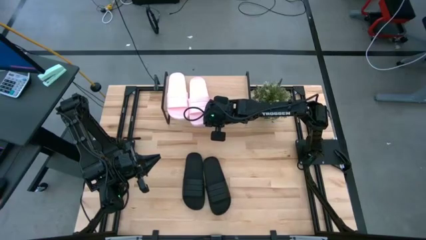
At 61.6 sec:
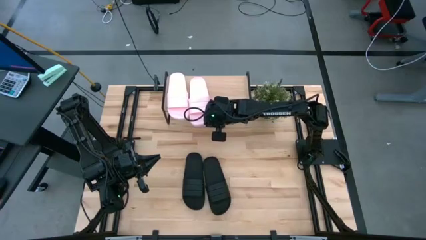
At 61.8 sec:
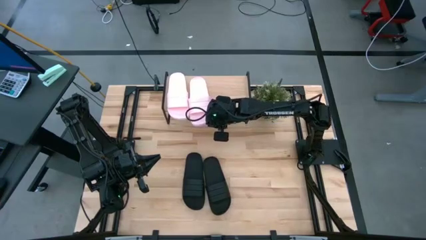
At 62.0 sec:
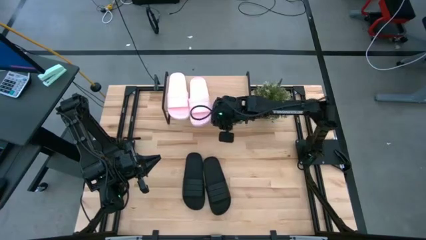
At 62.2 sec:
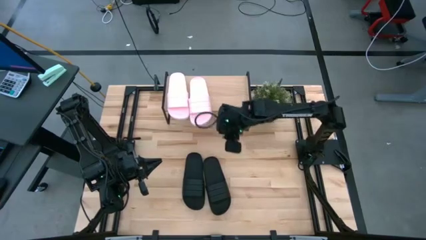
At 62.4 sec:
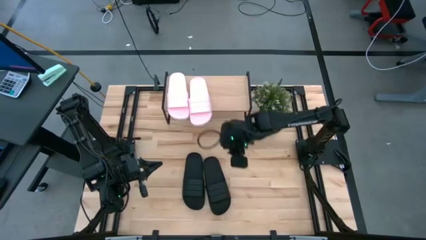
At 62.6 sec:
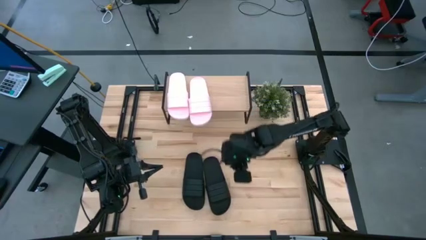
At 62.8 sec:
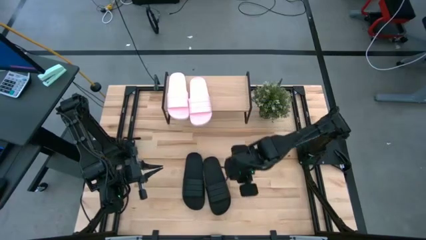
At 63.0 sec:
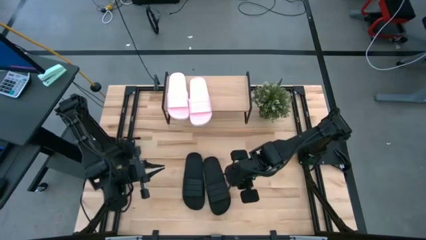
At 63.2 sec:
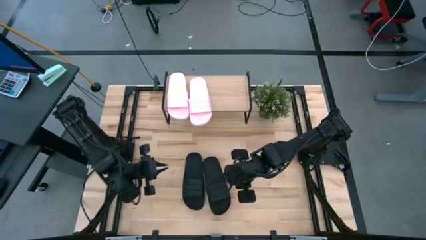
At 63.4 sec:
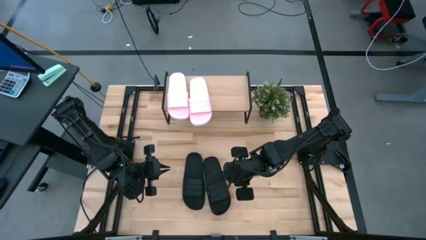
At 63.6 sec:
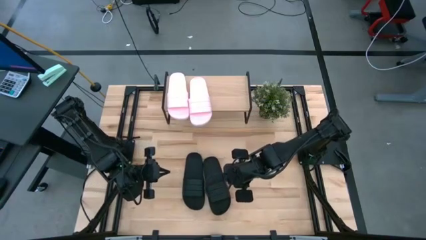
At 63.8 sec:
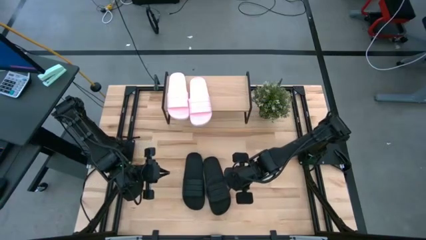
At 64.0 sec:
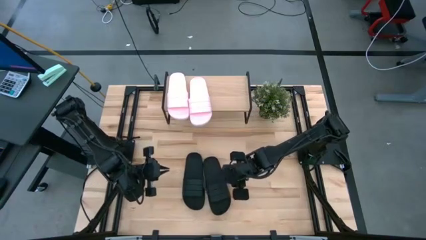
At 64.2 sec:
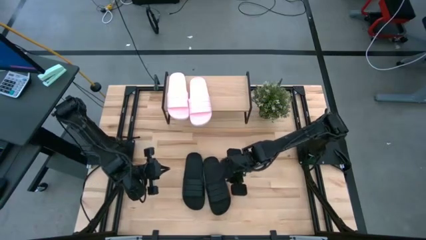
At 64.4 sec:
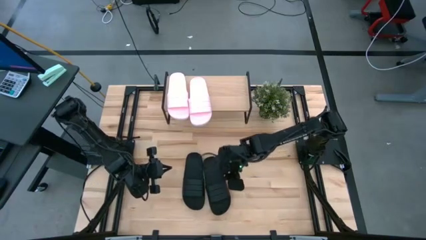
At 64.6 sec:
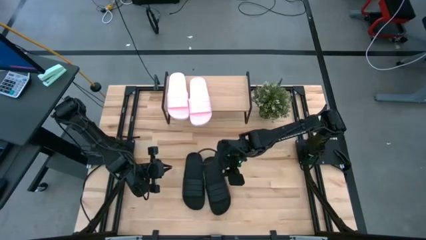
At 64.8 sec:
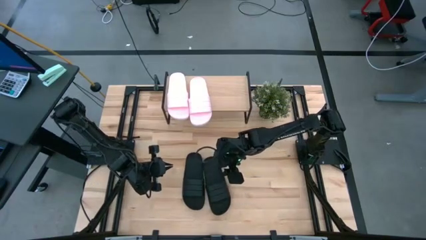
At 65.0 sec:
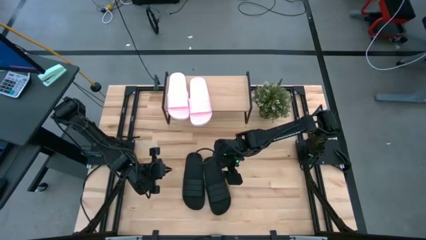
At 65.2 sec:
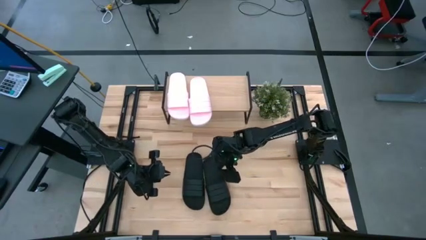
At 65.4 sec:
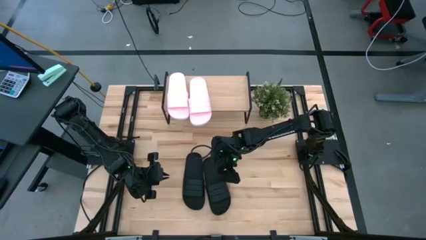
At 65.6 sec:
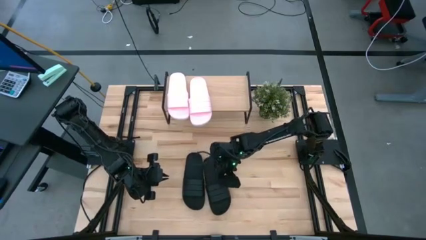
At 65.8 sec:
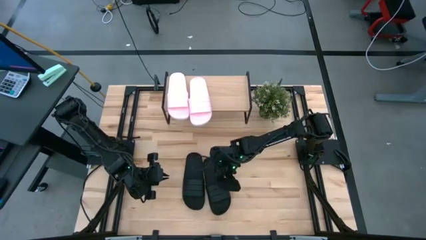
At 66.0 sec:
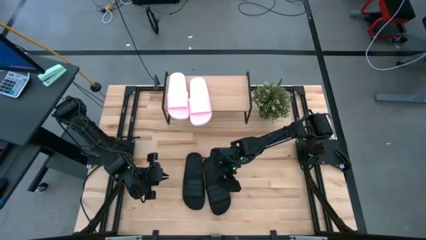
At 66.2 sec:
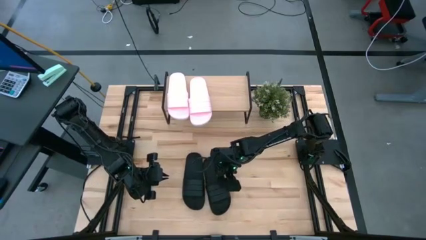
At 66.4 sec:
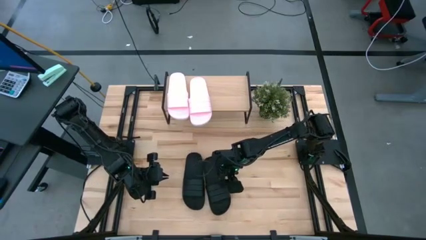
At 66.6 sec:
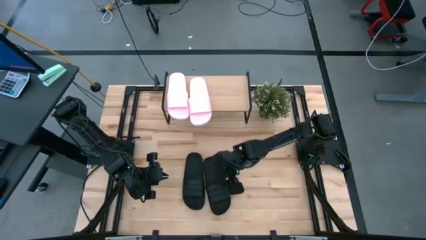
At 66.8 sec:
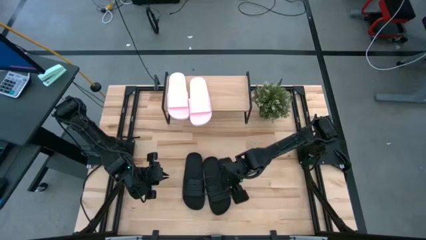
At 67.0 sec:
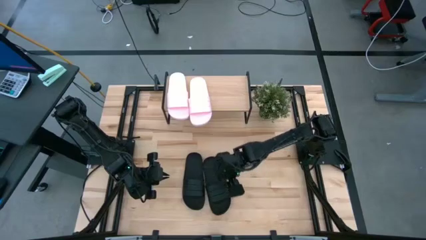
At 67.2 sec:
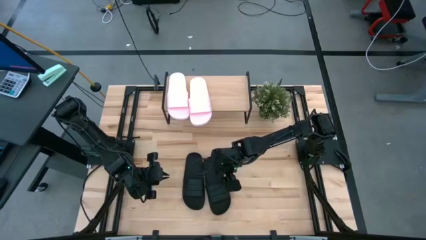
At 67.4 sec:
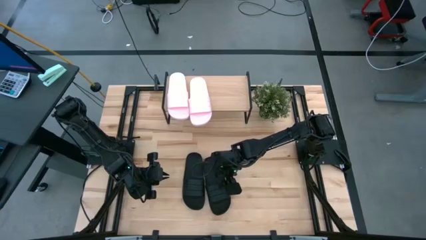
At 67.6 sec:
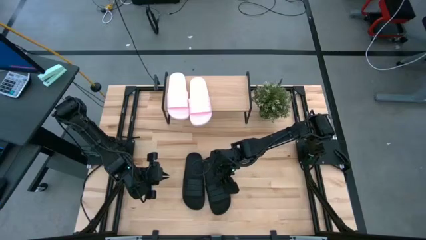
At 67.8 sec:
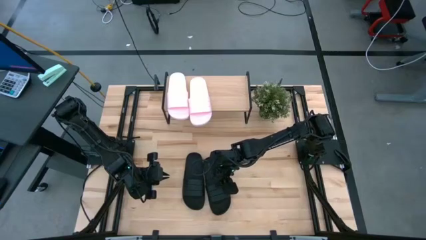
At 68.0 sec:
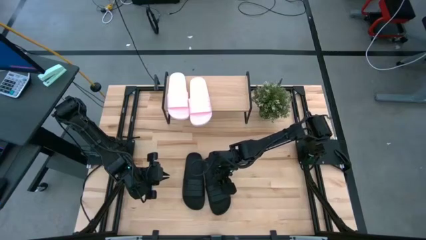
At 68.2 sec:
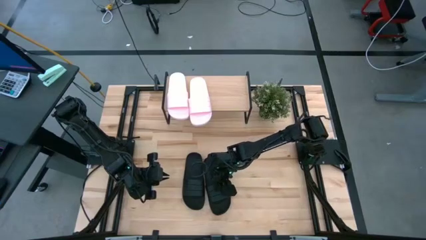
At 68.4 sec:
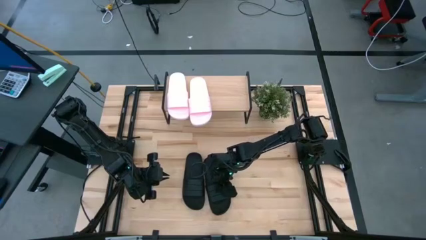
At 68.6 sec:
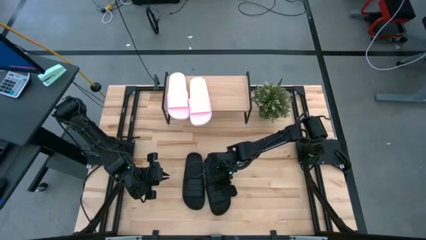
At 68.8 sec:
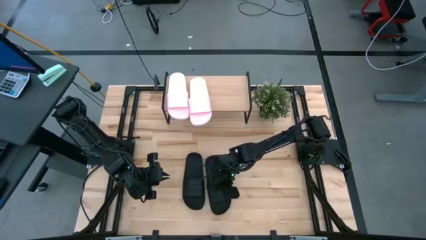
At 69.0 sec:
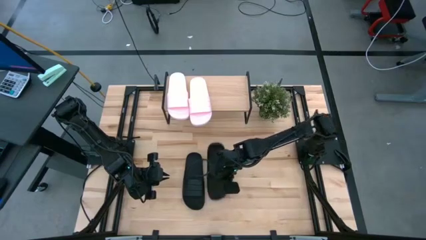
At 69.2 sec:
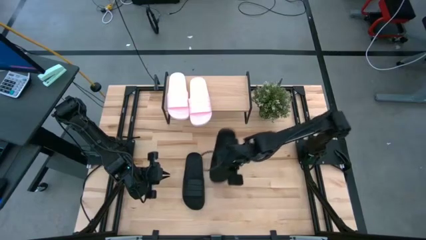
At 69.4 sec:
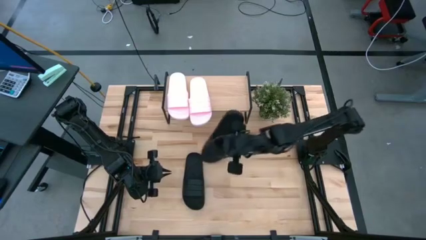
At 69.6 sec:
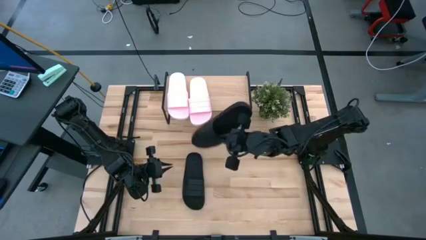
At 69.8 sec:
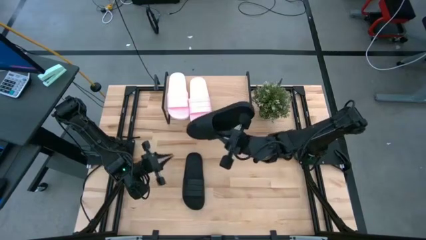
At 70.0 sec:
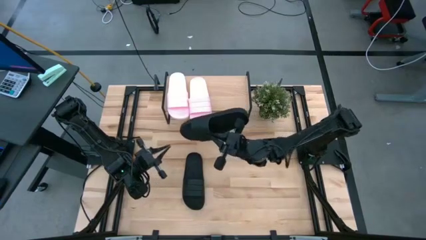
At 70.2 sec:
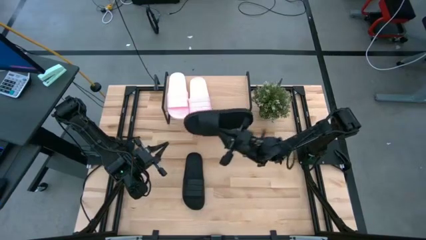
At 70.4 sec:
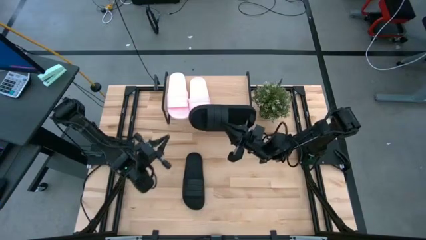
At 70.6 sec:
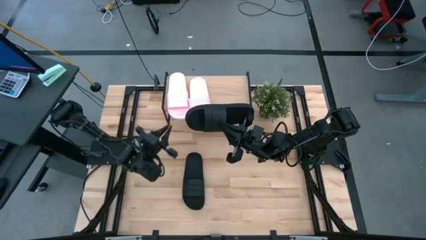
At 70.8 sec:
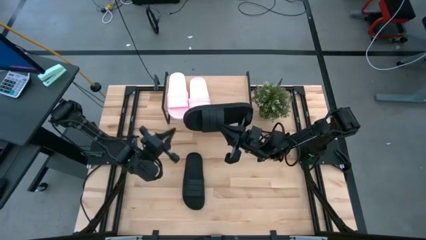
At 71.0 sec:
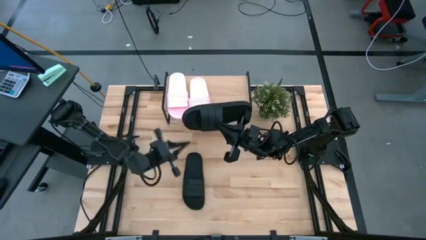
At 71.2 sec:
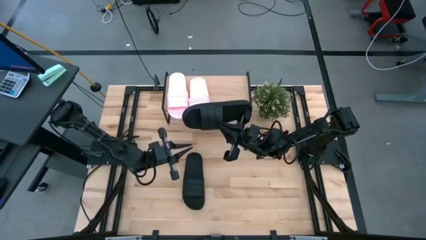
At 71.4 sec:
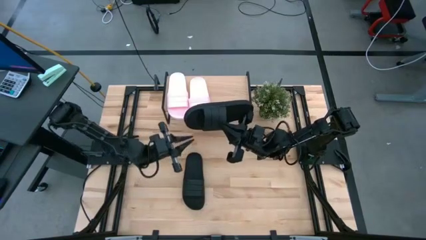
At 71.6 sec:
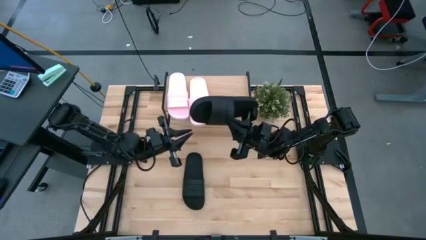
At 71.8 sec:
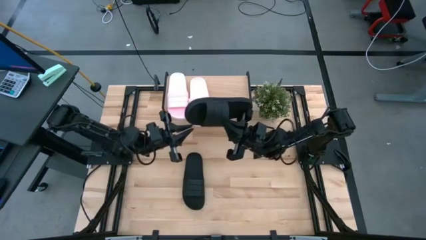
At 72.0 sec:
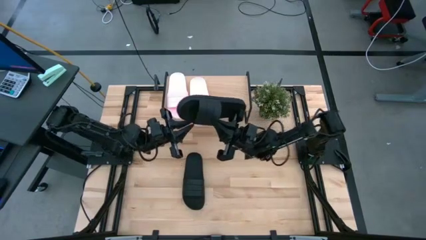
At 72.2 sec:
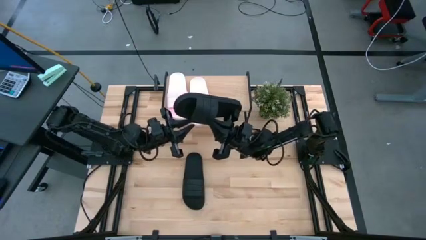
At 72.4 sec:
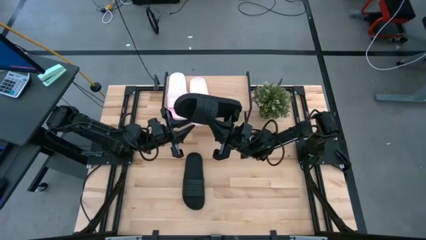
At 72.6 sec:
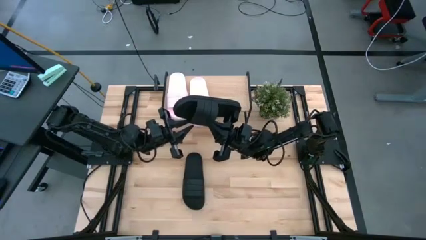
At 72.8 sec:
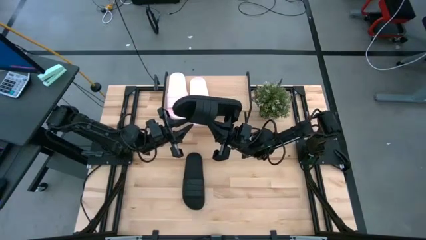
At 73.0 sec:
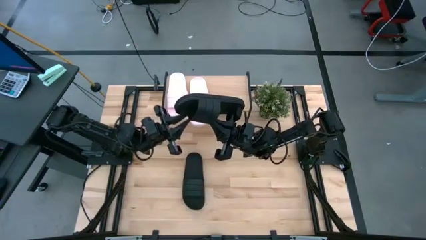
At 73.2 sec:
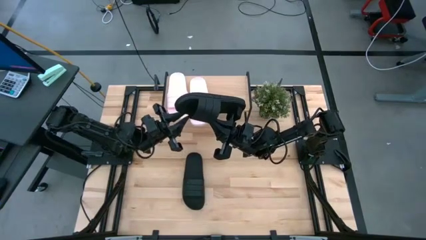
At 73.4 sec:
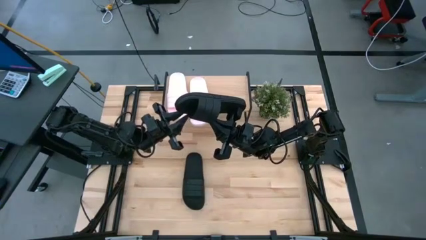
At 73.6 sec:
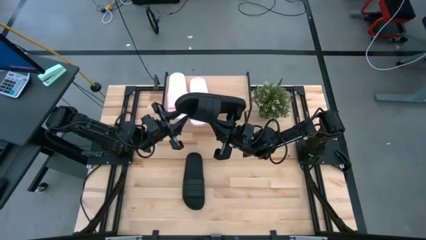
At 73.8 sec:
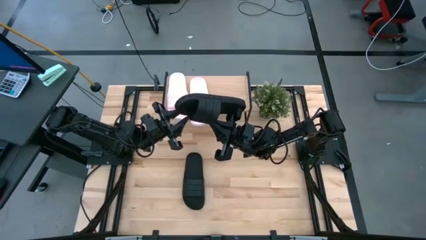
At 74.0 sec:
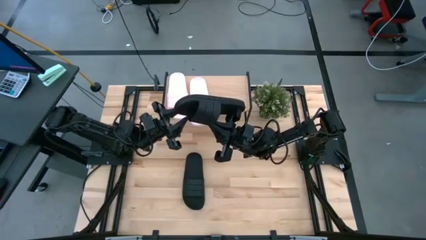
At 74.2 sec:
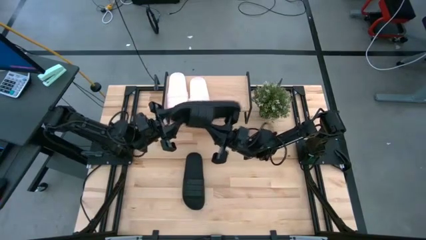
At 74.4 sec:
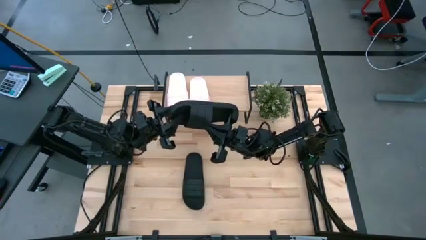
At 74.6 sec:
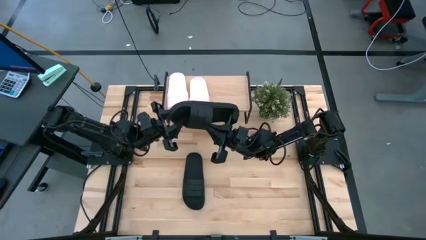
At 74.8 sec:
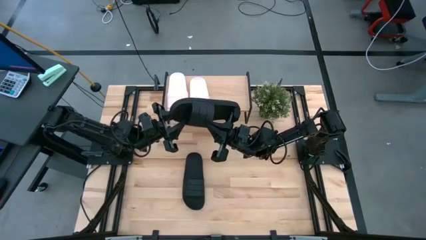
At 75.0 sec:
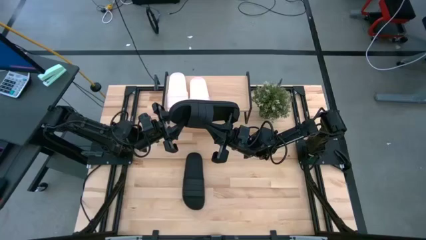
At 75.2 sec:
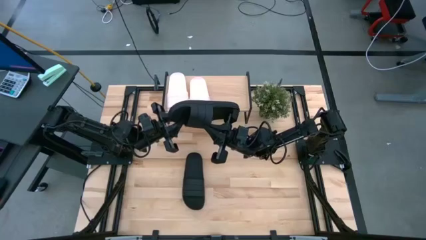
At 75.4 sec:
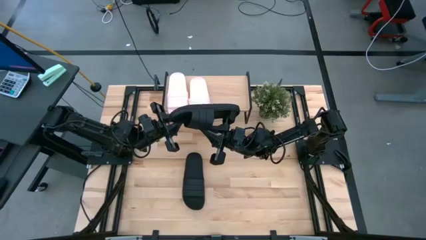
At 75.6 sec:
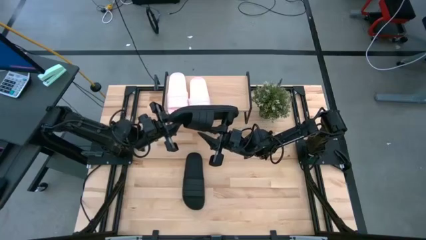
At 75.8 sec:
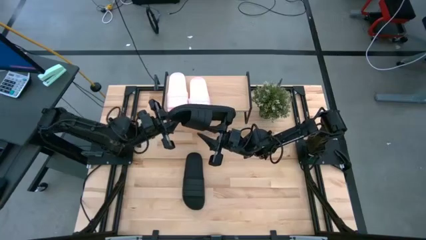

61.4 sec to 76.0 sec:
Task: Pick and place slides into the shelf
Put the right black slide on the shelf

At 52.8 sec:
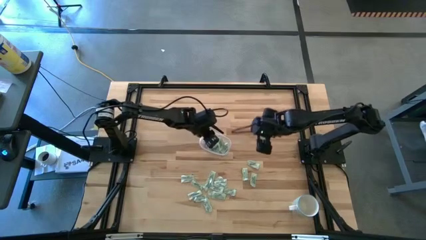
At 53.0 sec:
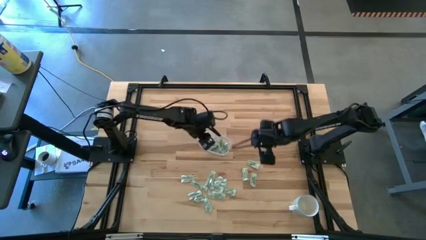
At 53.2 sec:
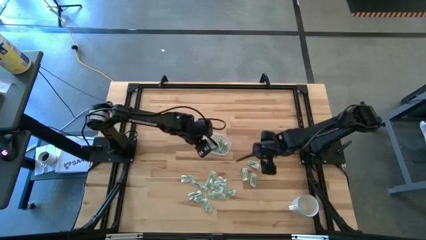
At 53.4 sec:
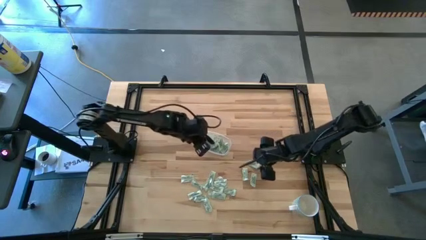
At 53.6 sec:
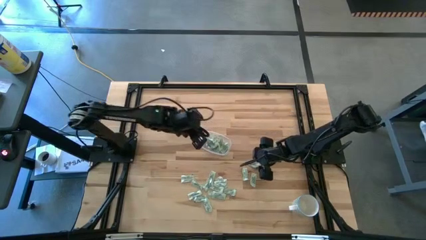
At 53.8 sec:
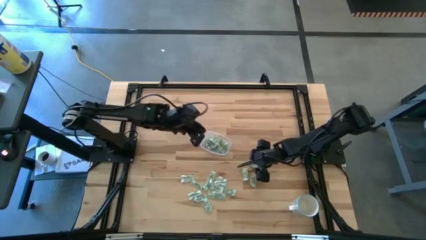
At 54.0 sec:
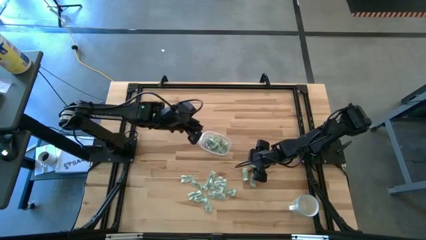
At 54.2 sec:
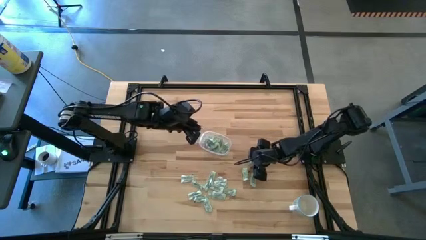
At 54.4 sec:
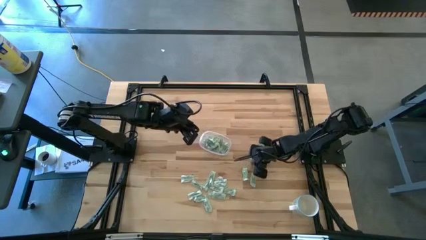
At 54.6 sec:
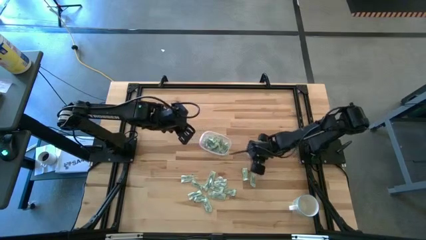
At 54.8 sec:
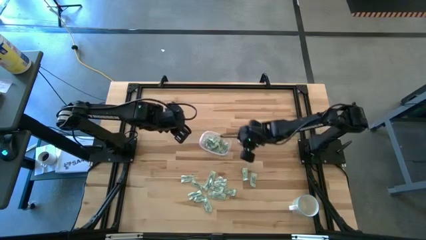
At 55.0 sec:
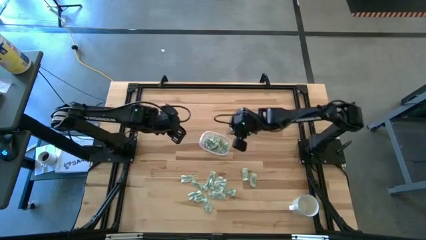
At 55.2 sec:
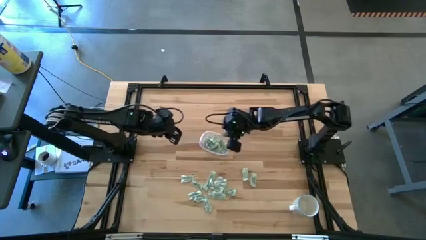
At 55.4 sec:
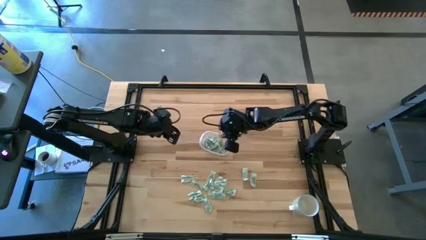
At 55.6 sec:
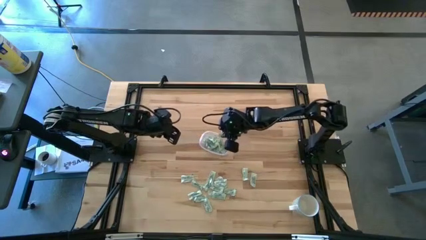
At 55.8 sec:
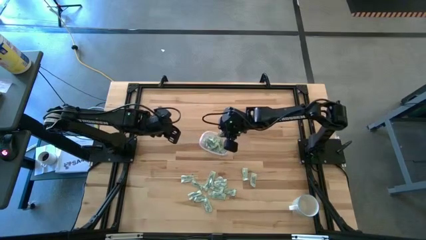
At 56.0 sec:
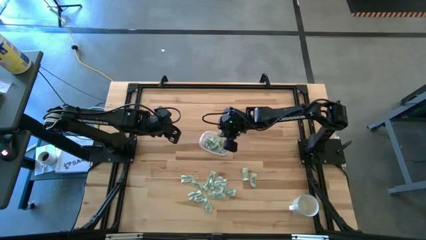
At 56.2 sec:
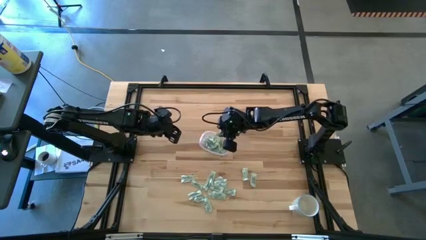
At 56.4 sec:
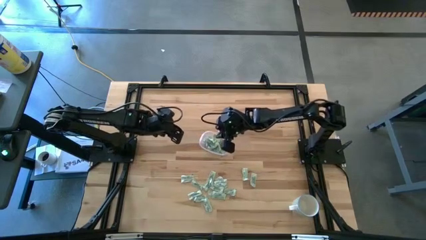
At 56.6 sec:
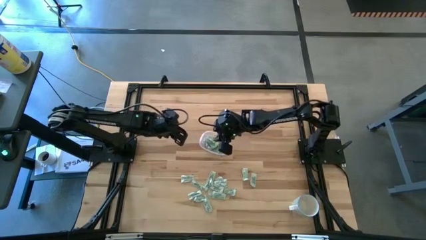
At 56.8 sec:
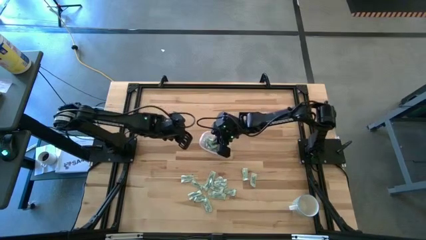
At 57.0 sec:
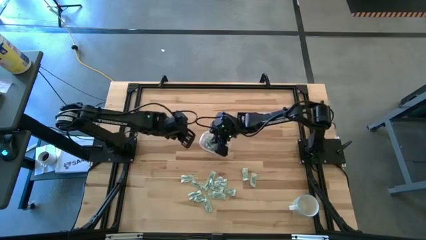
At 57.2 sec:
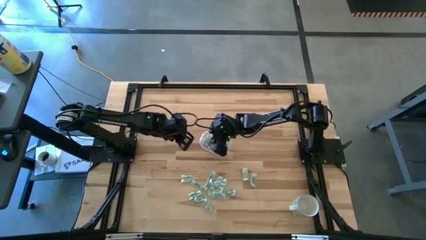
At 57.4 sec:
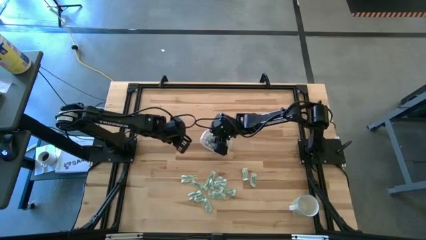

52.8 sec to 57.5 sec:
Task: Pick and place Stevia / Truvia into bins
Put the stevia packet into the transparent container
